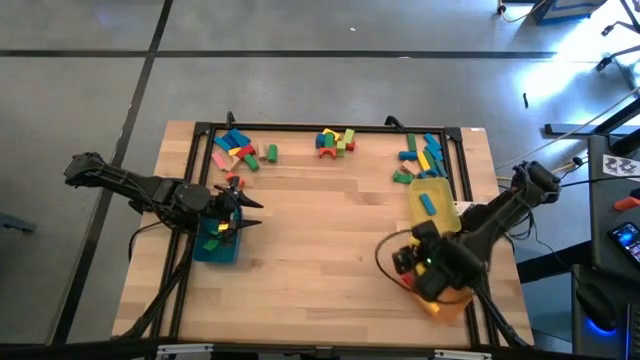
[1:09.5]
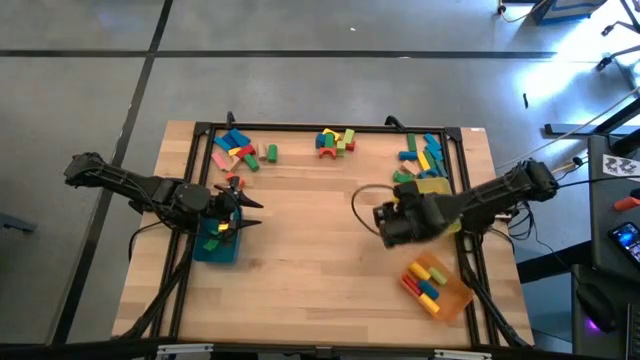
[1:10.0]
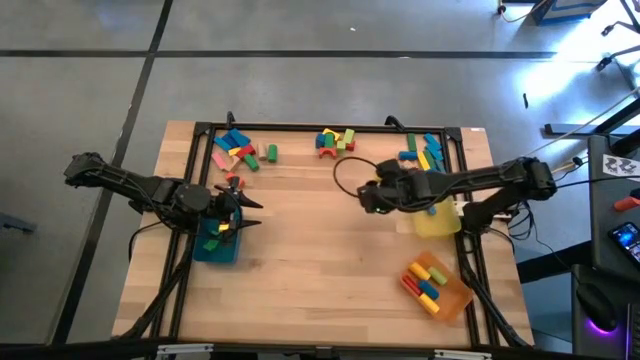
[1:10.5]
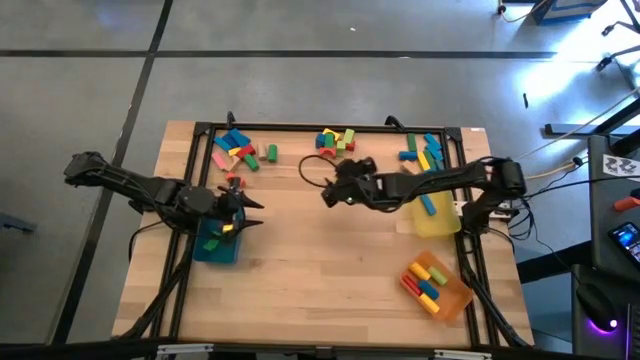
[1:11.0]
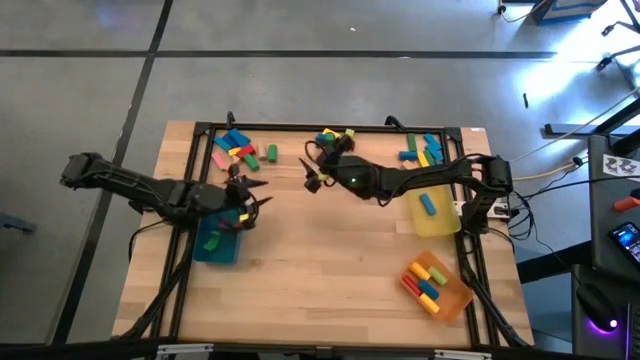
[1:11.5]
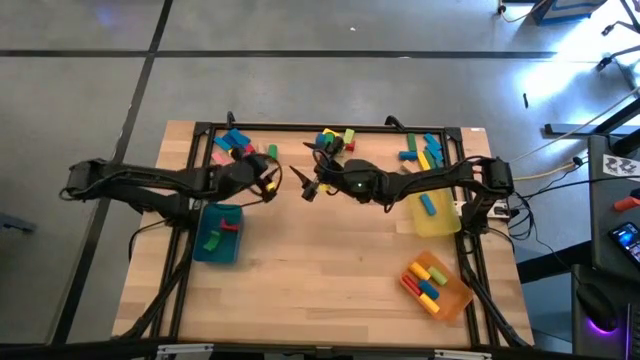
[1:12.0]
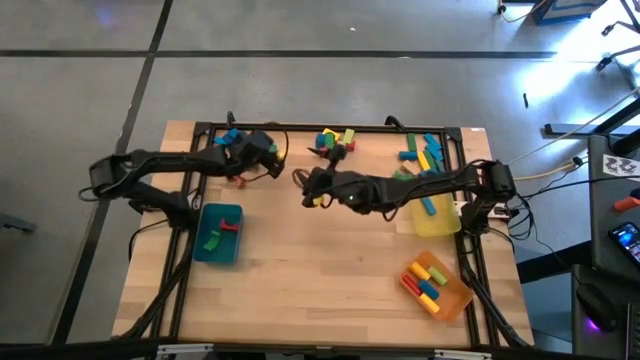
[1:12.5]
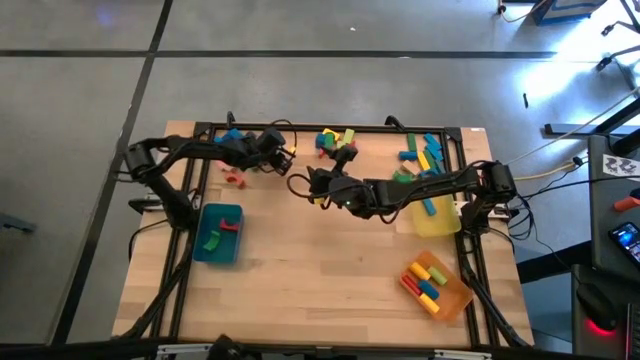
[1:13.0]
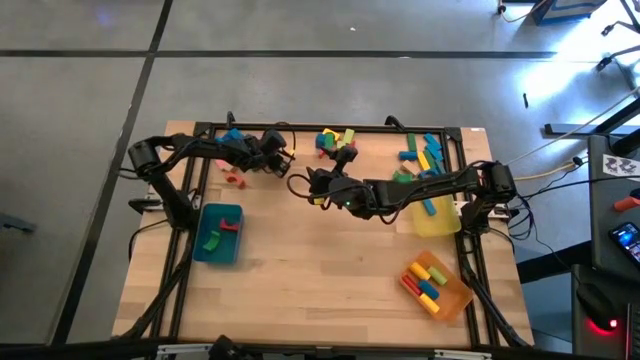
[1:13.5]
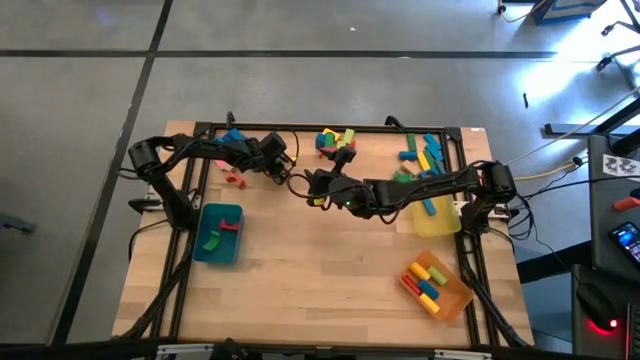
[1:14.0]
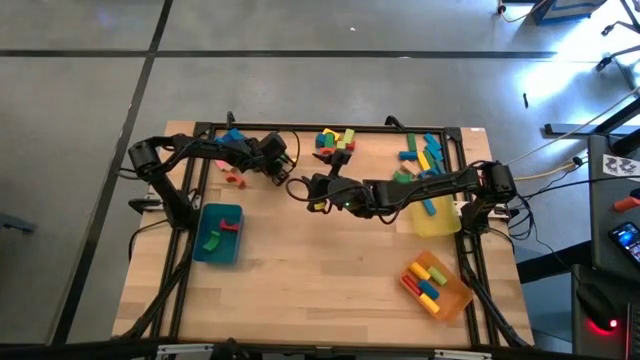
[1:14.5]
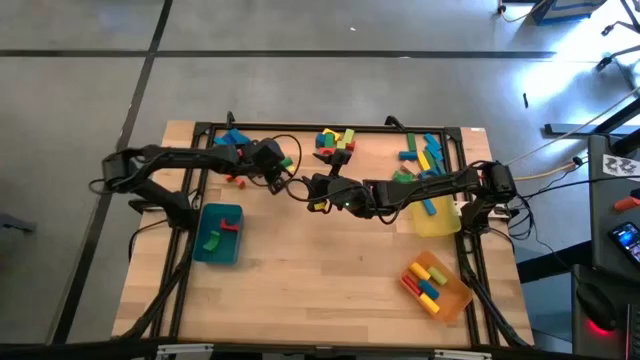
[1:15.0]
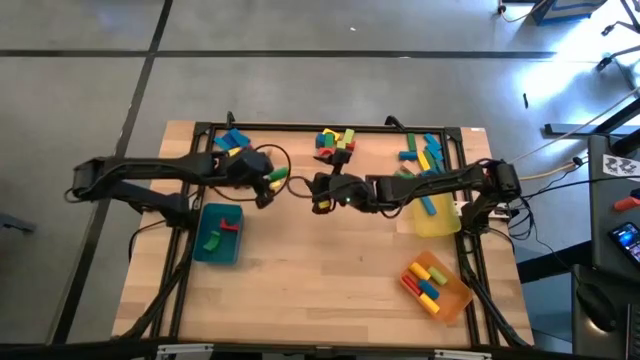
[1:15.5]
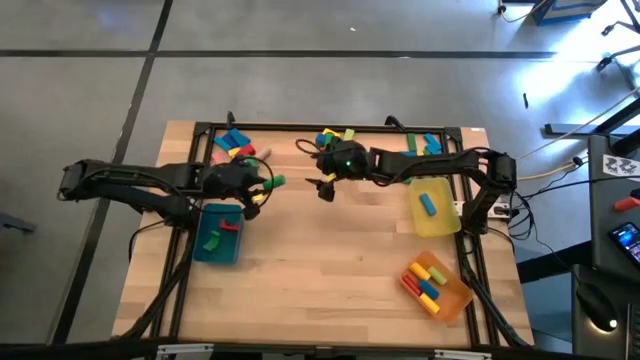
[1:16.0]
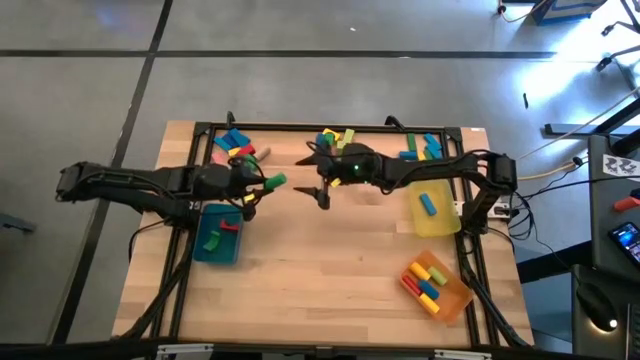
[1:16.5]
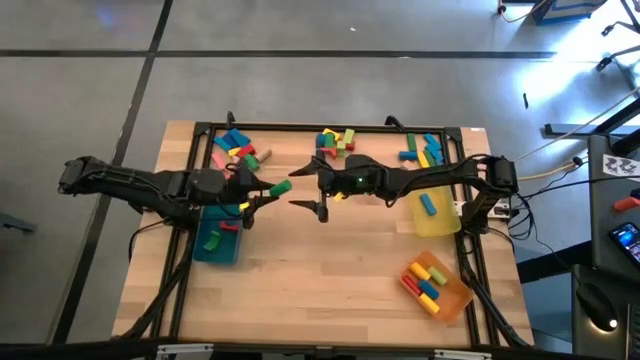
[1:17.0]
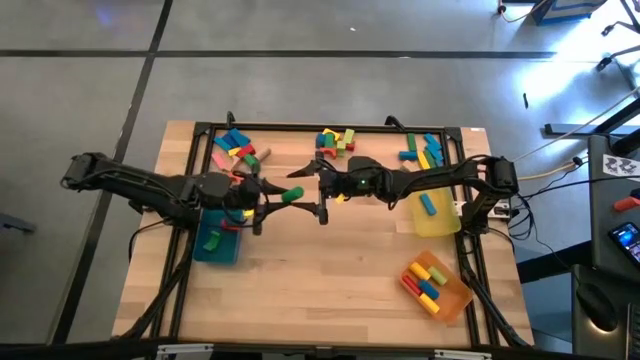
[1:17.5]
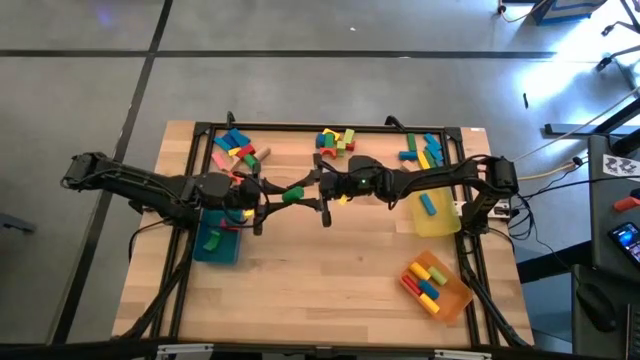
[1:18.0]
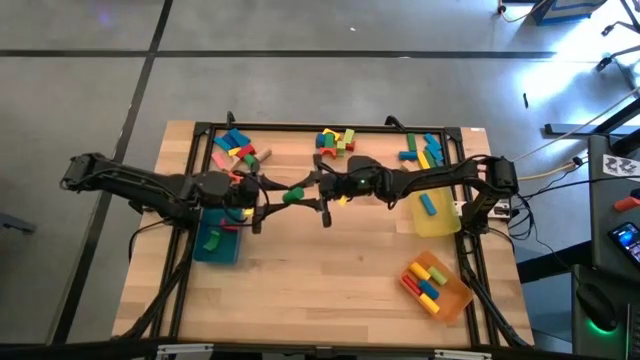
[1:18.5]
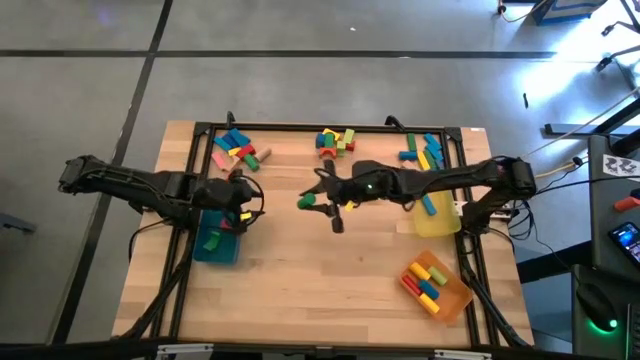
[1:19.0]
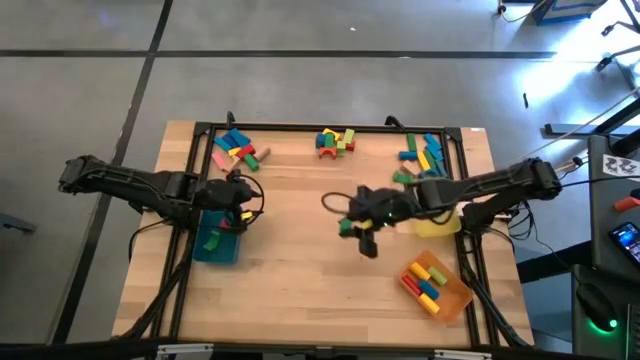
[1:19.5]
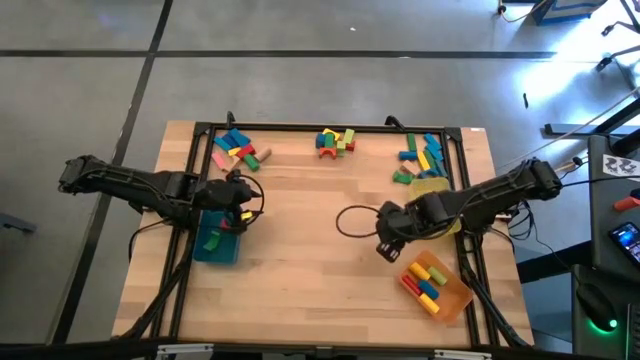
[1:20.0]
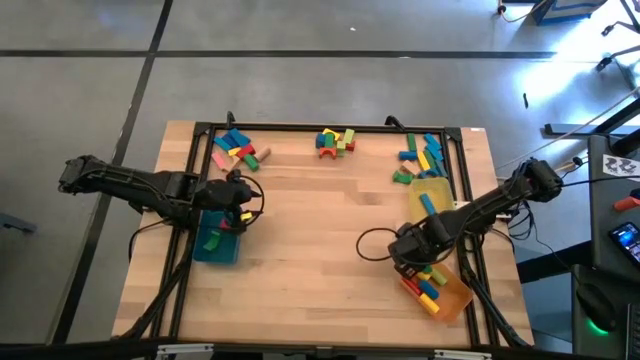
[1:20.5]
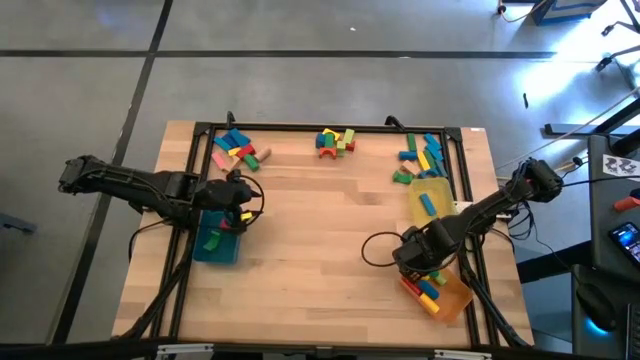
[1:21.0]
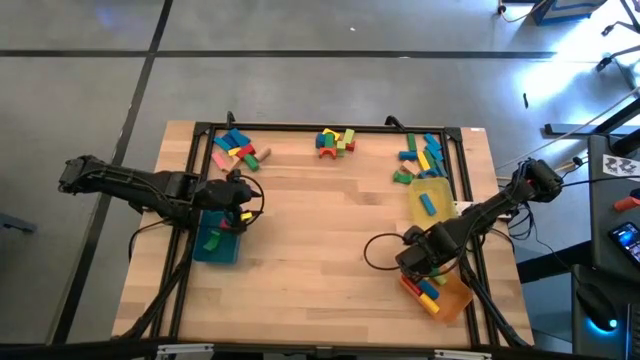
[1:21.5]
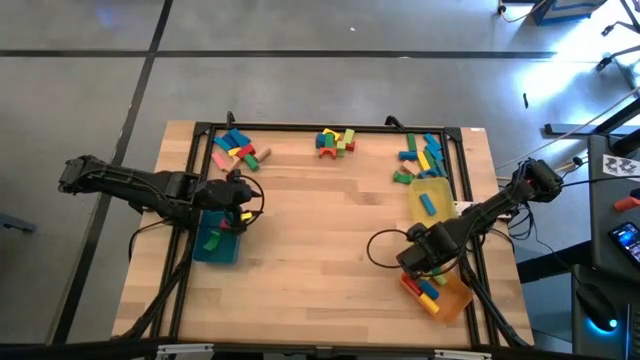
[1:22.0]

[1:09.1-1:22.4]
Task: Sort blocks by size
Put the green cylindrical block into the orange bin

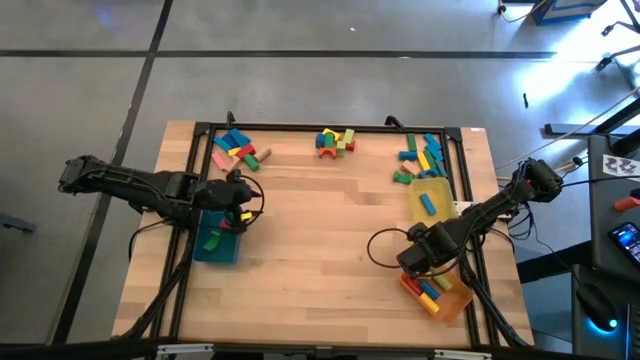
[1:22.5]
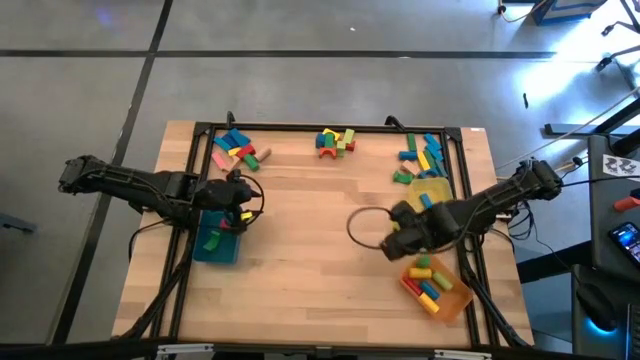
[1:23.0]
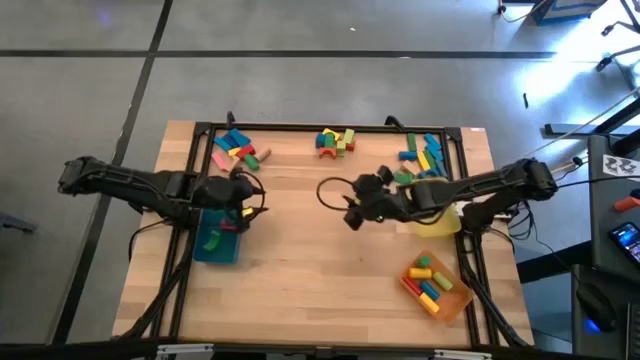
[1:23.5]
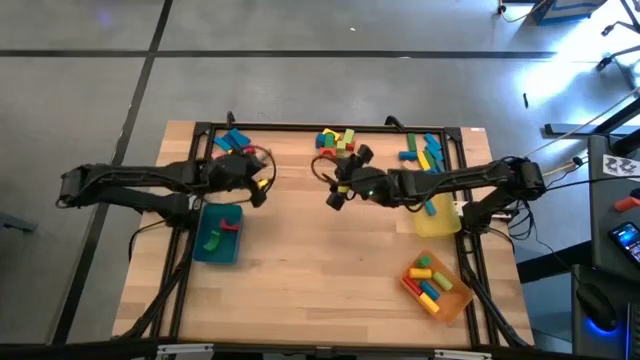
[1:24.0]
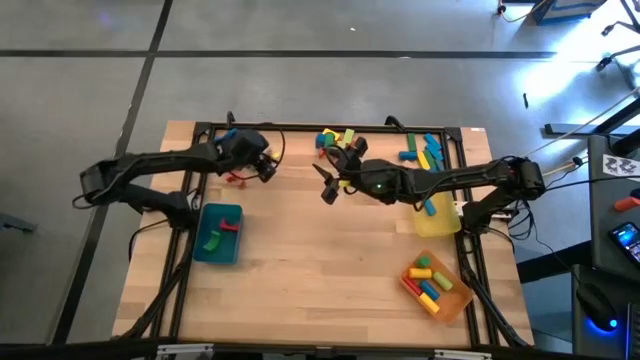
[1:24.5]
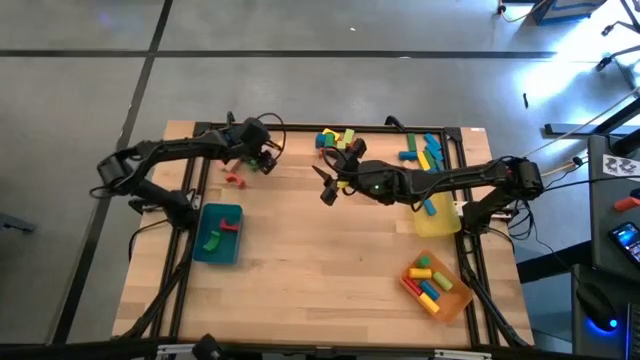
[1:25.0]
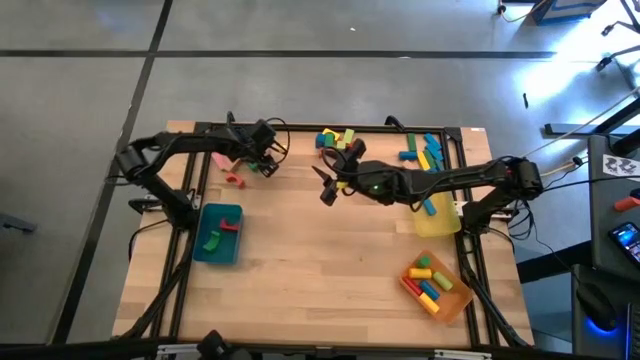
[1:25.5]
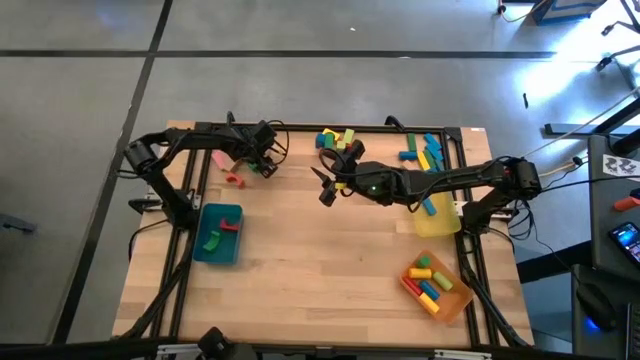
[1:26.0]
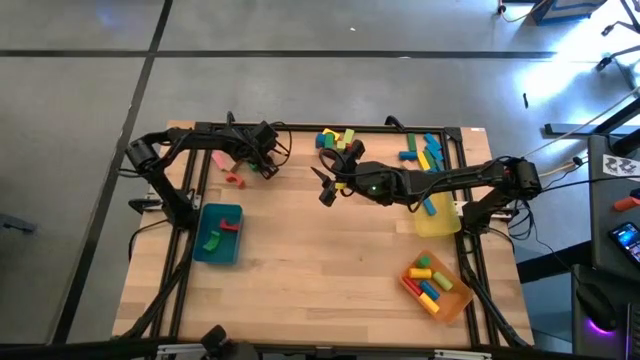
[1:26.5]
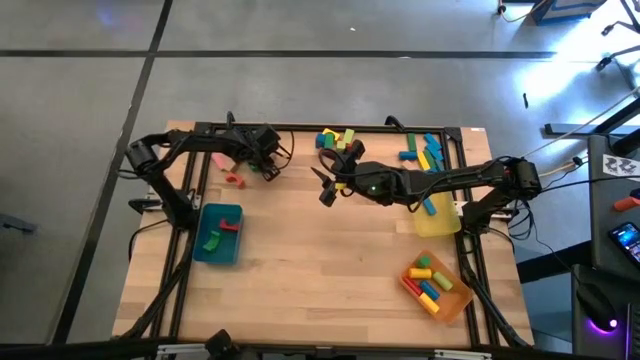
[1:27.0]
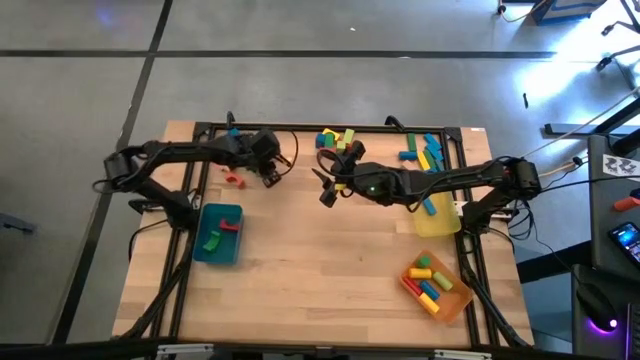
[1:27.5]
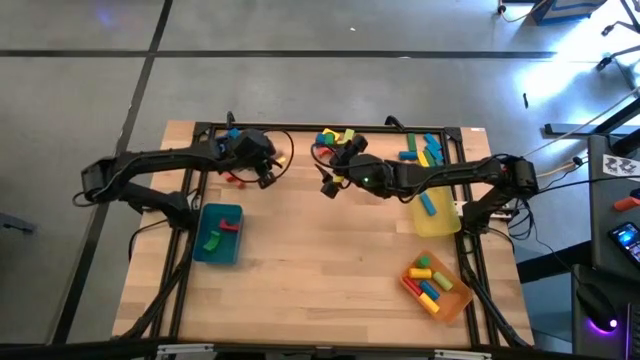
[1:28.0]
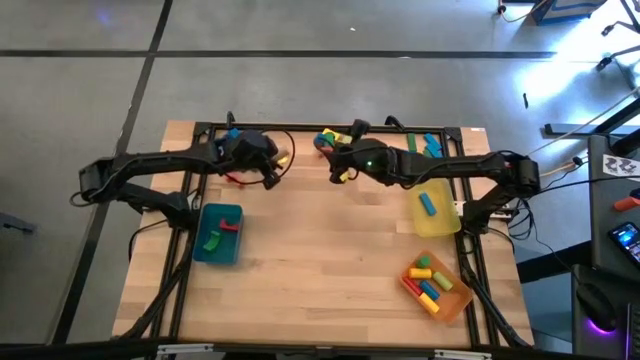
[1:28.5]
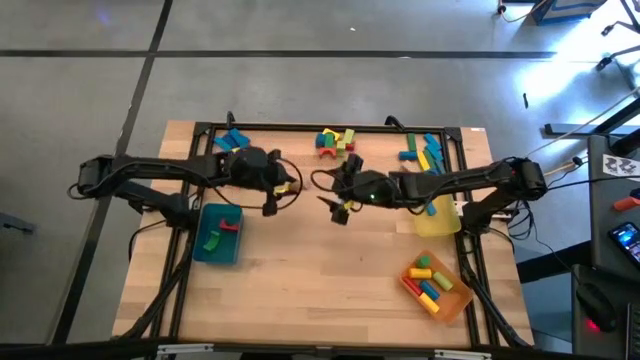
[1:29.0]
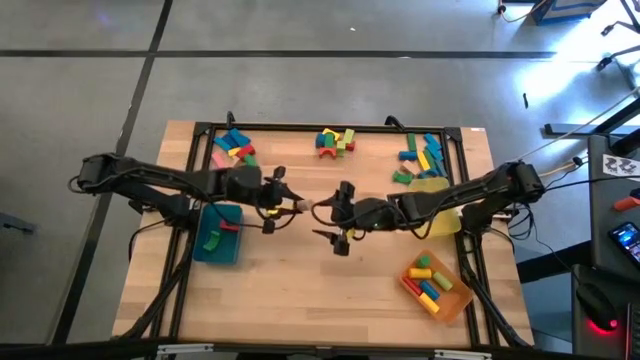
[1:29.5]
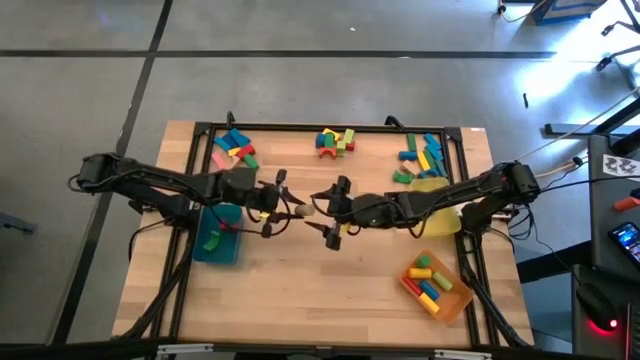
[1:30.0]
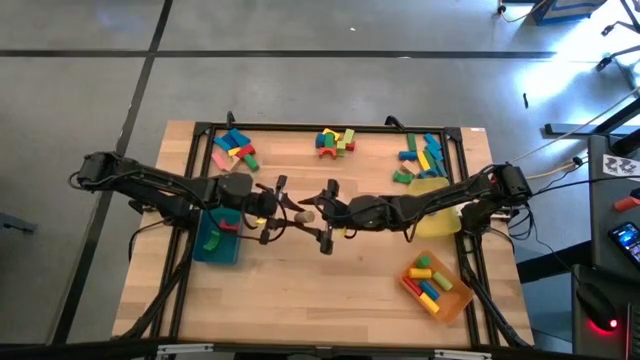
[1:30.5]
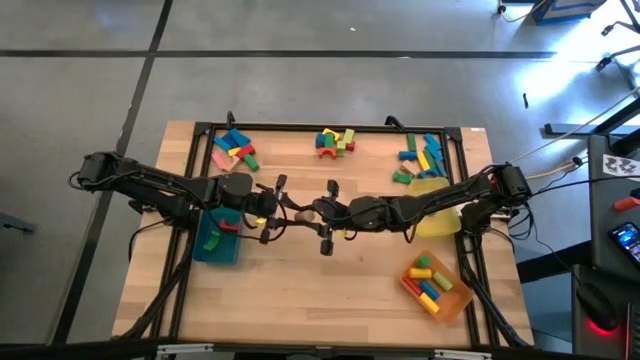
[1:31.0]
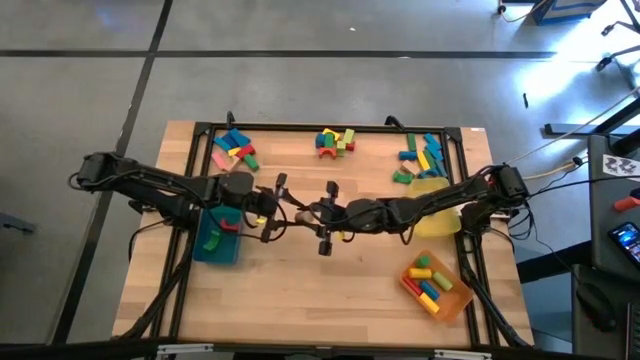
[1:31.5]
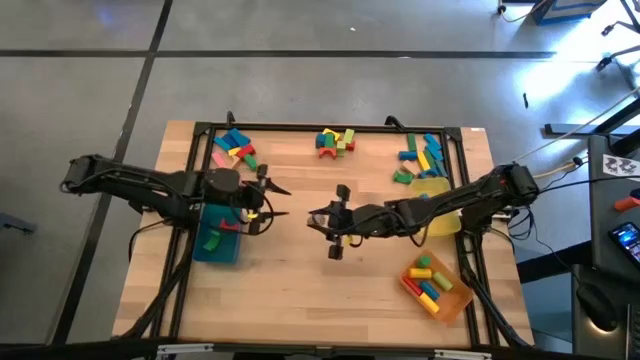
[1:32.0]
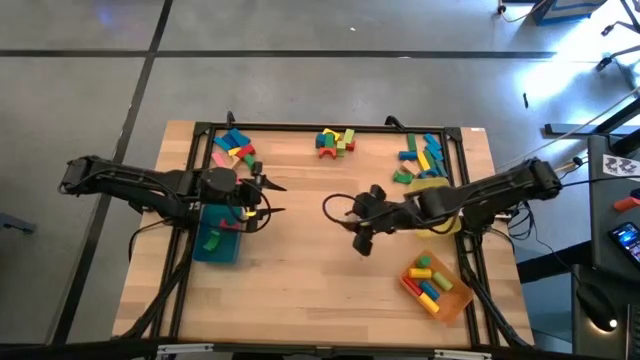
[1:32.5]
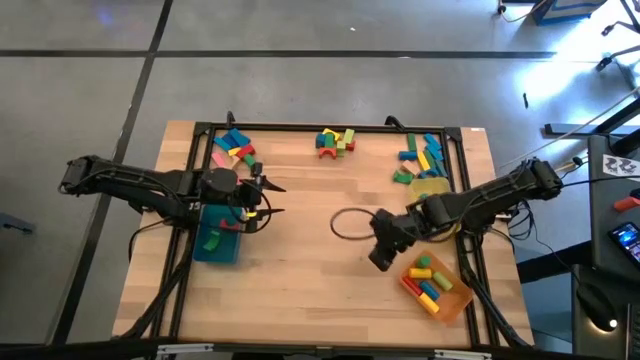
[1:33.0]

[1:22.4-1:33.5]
Put the brown cylindrical block into the orange bin
